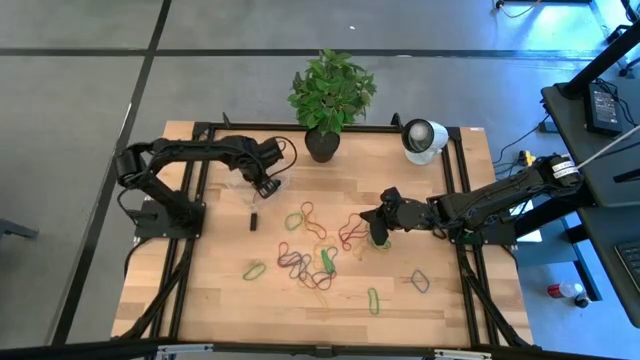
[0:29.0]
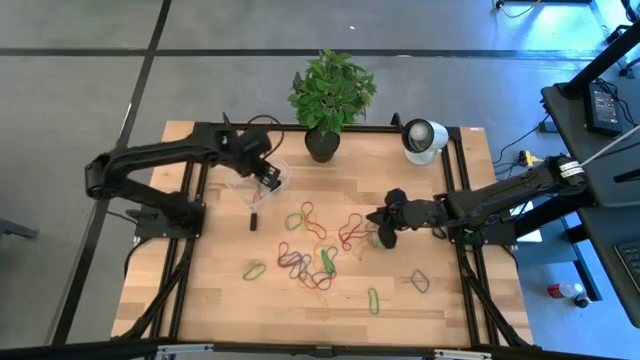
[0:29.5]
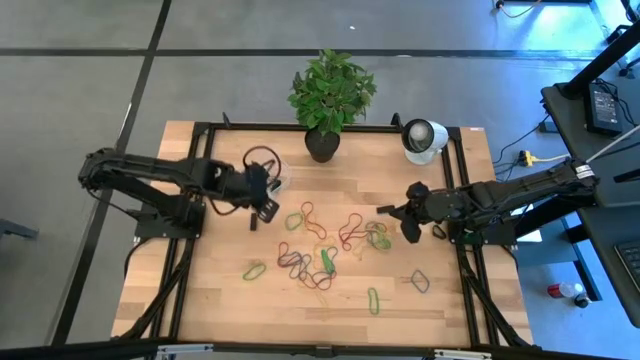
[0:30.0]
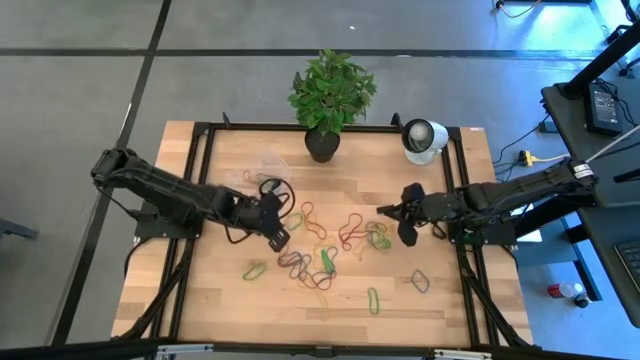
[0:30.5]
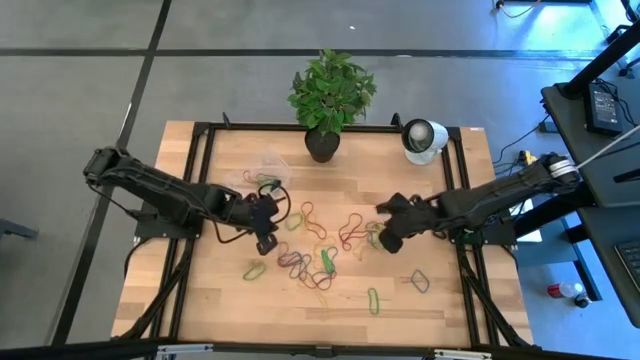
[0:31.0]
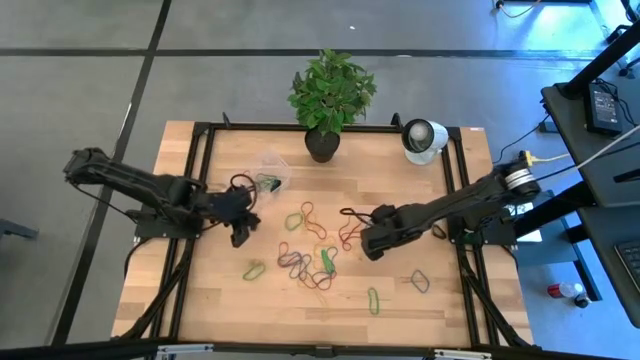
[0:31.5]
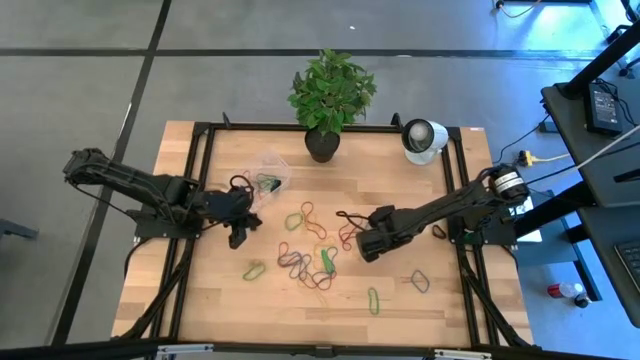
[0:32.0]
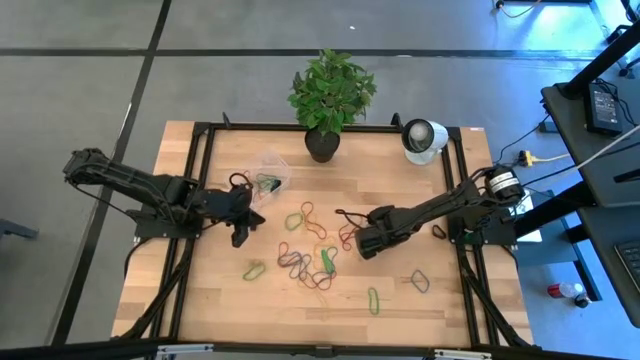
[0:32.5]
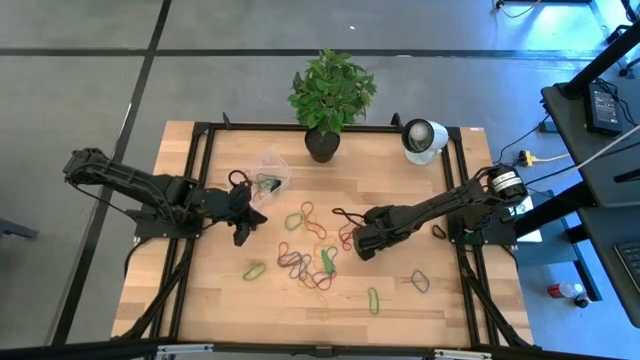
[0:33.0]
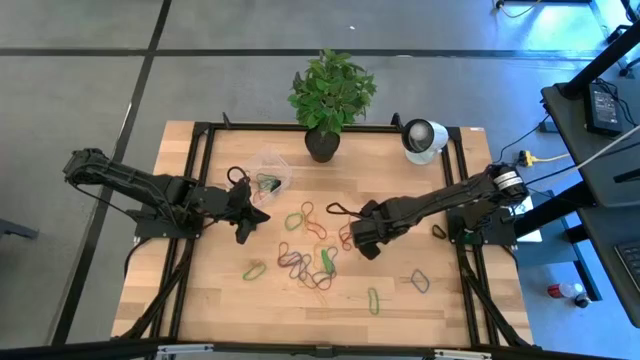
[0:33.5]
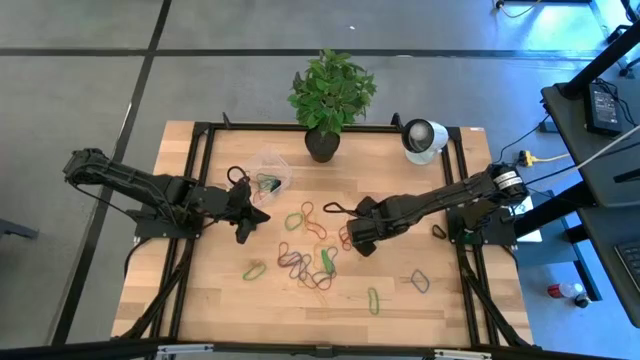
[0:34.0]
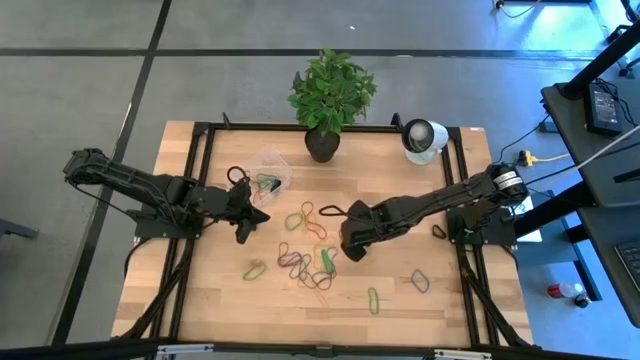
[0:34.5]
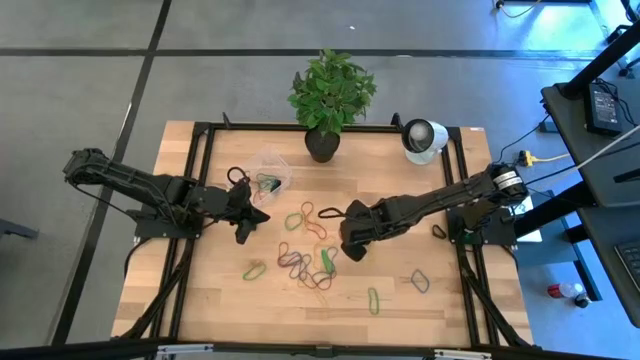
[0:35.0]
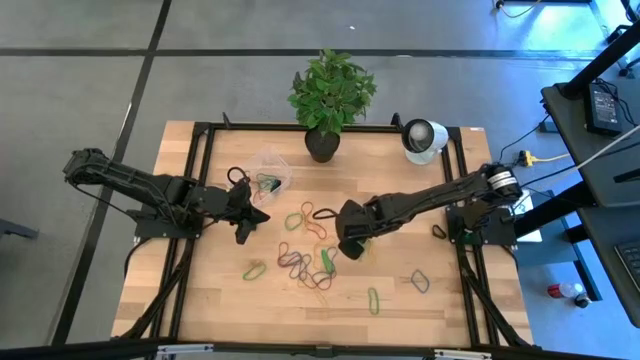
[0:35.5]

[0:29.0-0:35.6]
Task: Pick and place rubber bands into bin
Put the green rubber band into the transparent bin

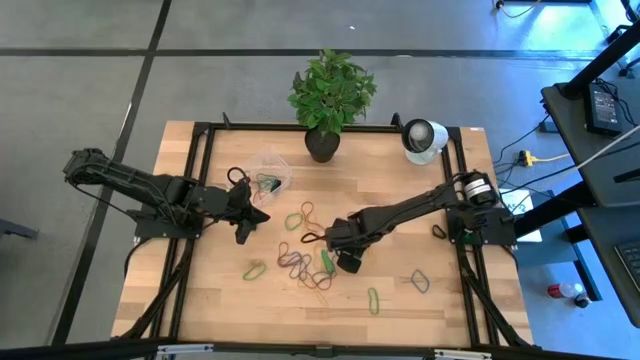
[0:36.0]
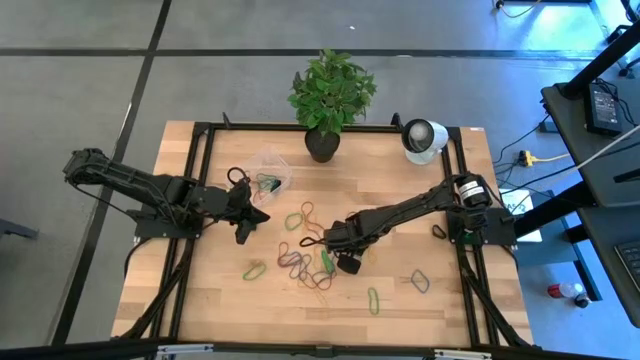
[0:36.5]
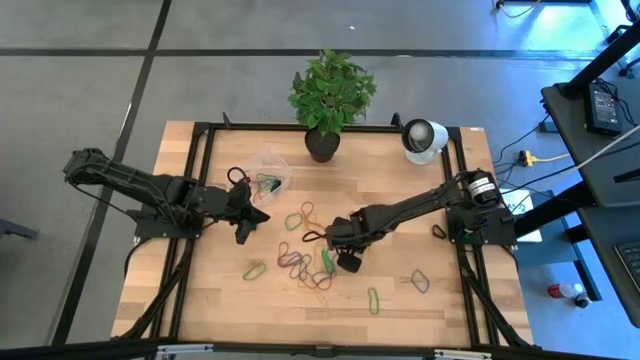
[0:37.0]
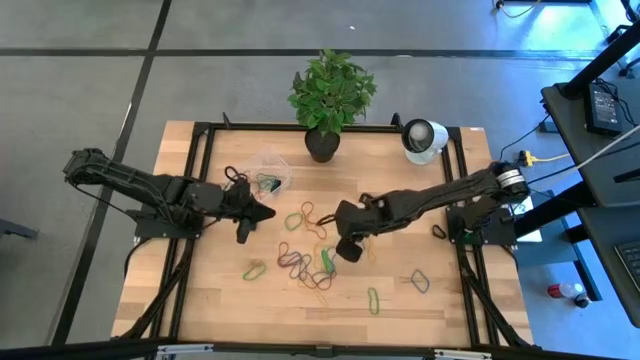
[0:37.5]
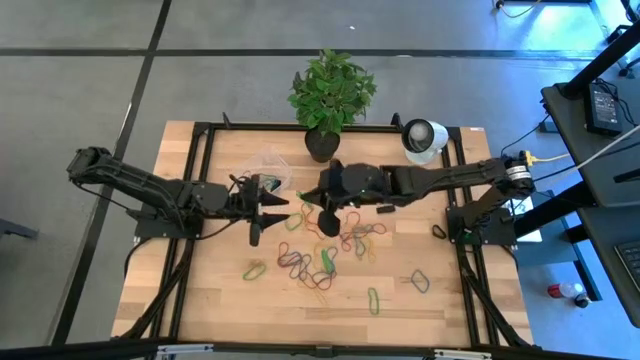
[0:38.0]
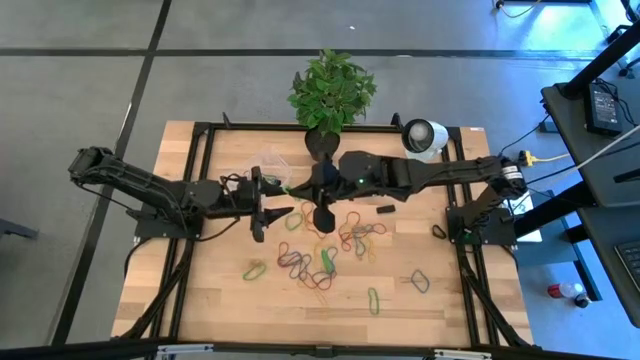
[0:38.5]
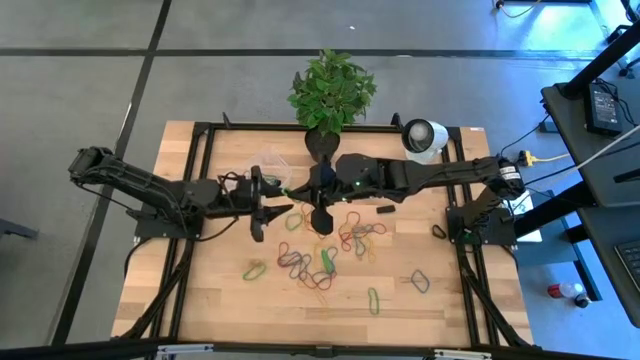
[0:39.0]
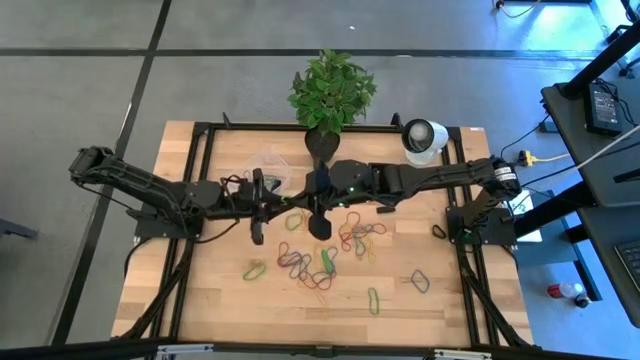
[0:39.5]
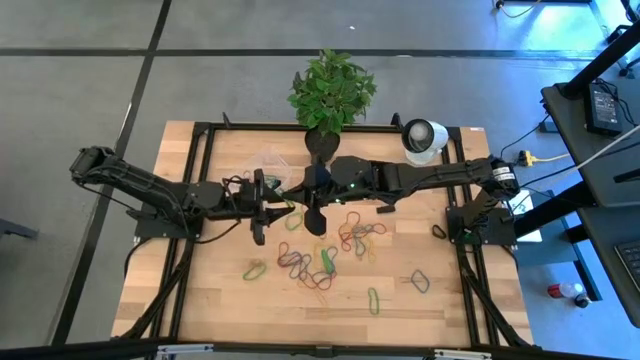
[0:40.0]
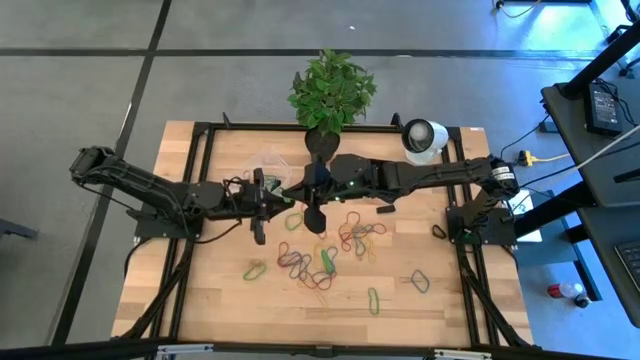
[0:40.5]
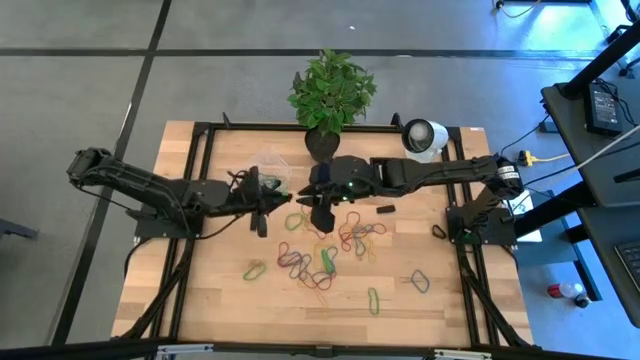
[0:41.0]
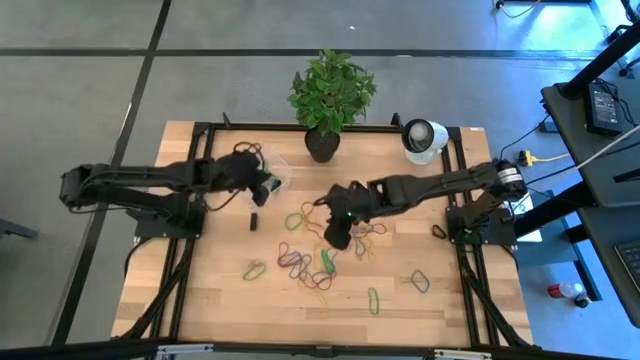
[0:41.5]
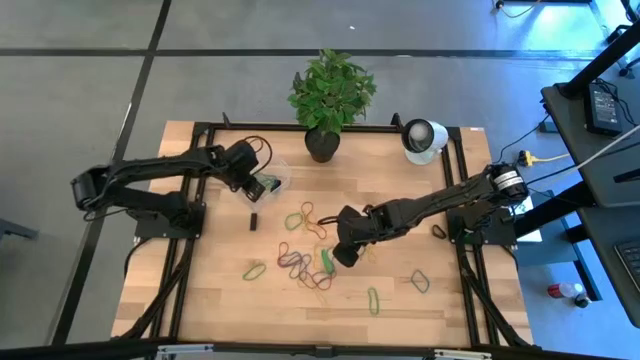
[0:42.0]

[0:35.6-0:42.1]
Put the green rubber band into the transparent bin

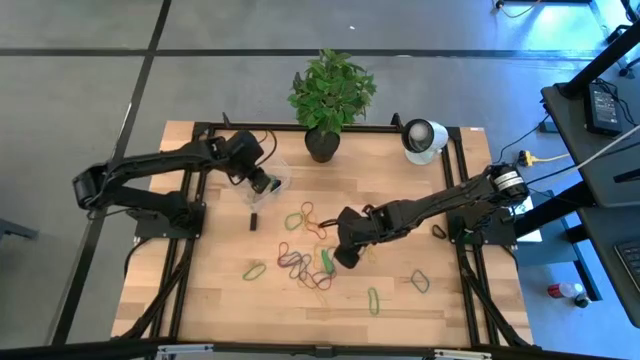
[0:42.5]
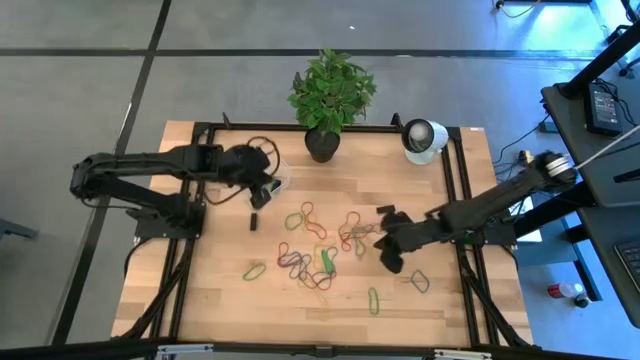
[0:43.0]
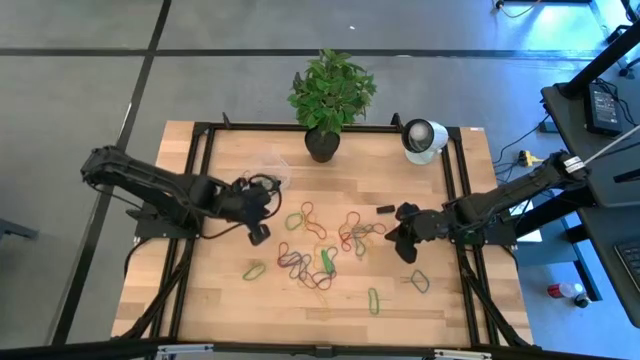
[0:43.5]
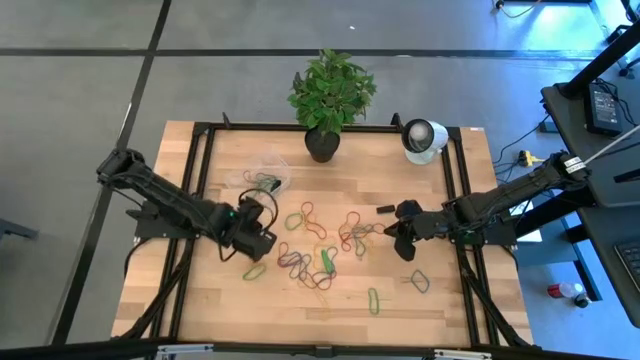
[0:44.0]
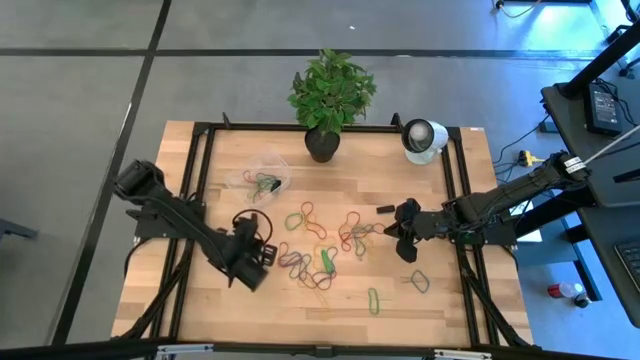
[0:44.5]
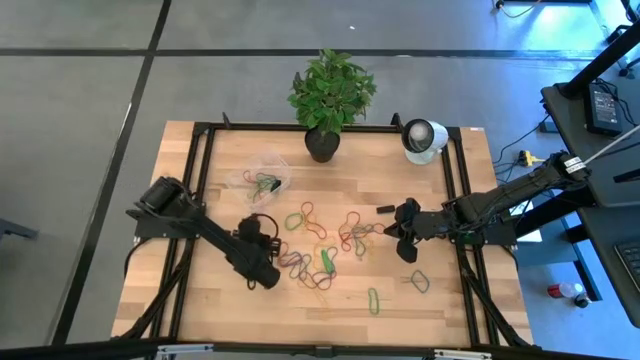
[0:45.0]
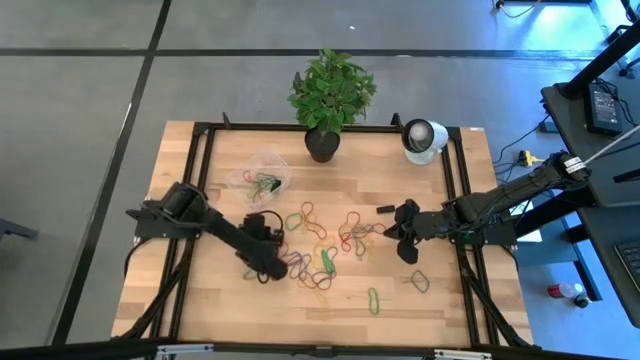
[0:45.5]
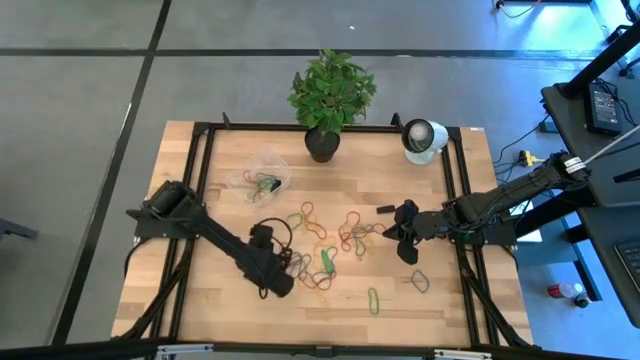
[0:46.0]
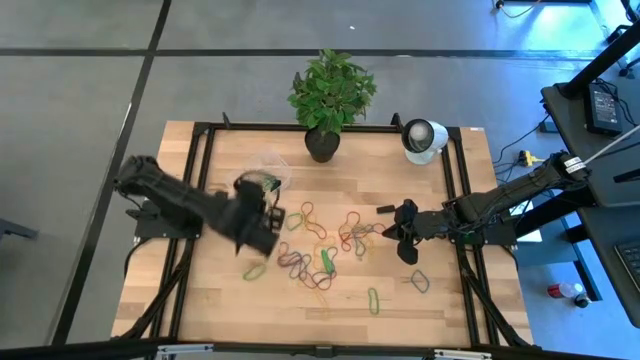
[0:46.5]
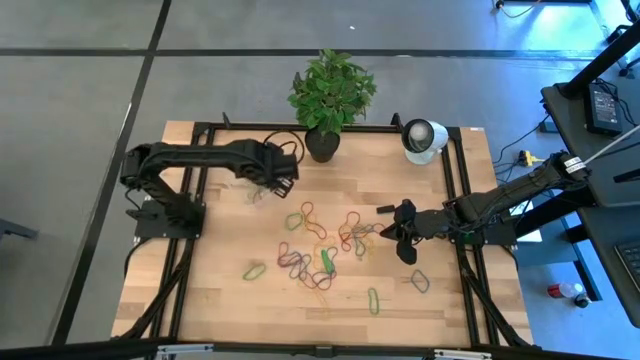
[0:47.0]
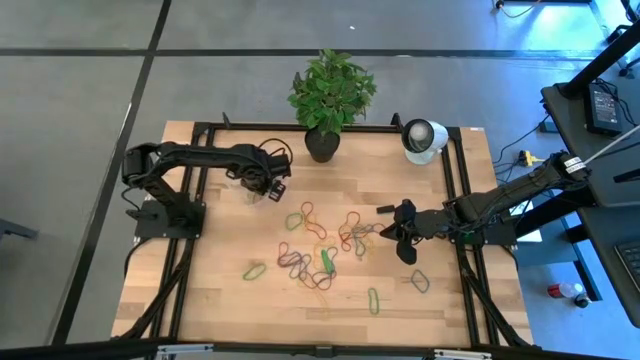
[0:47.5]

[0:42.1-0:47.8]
Put the black rubber band into the transparent bin
